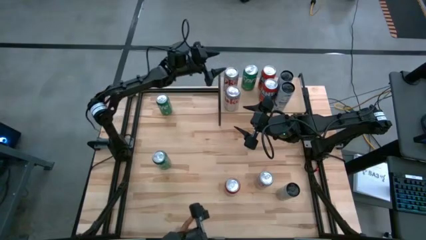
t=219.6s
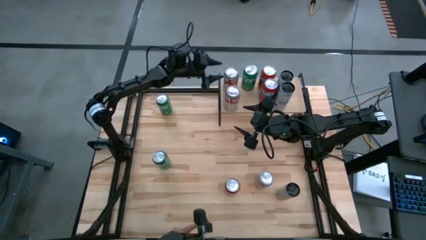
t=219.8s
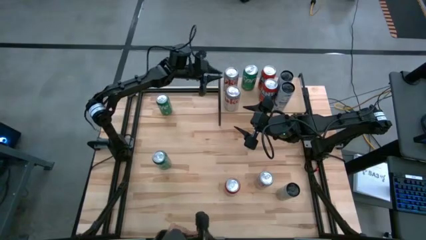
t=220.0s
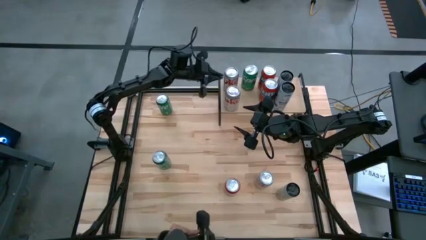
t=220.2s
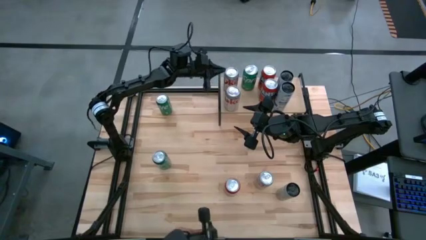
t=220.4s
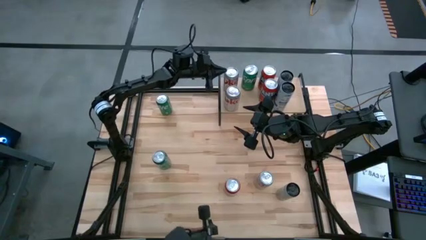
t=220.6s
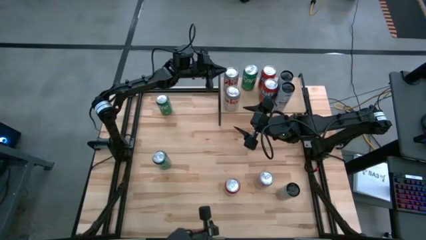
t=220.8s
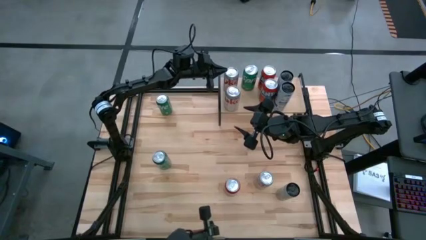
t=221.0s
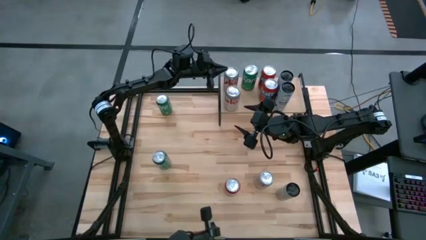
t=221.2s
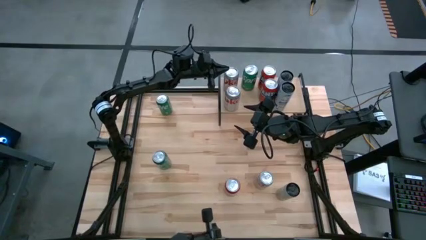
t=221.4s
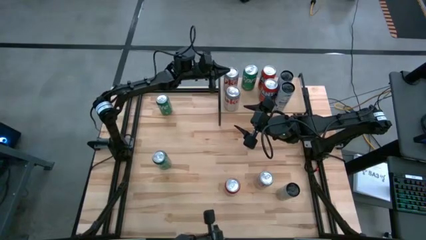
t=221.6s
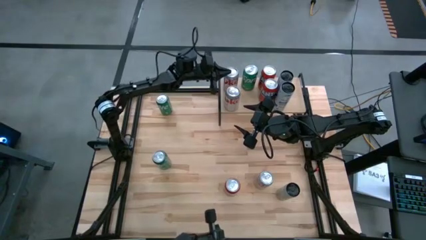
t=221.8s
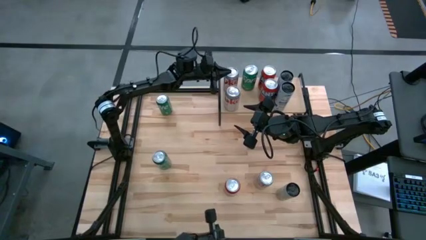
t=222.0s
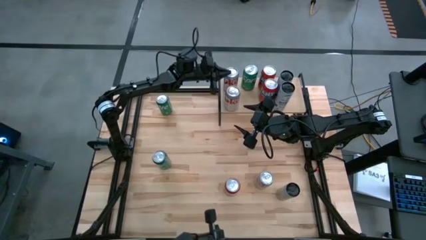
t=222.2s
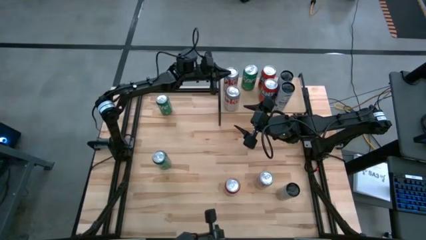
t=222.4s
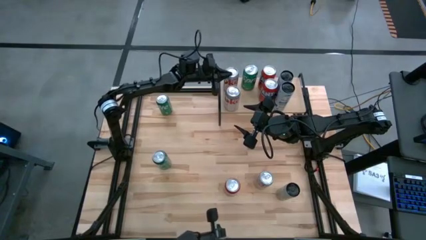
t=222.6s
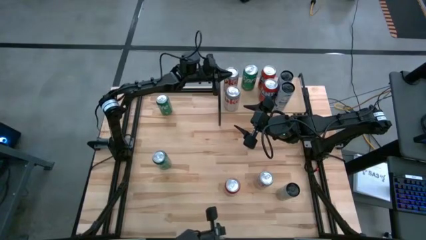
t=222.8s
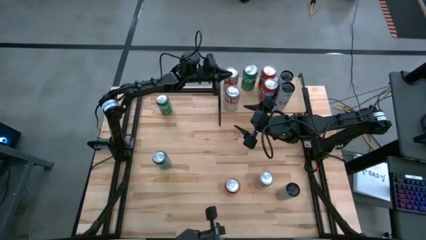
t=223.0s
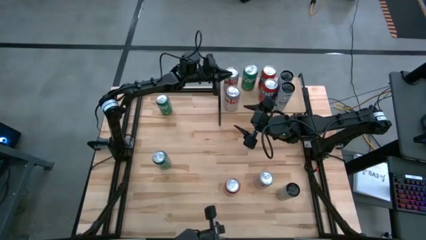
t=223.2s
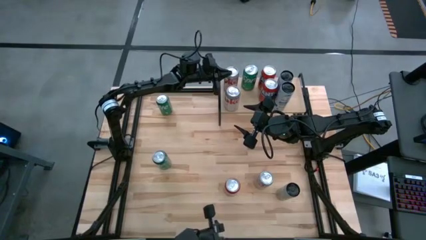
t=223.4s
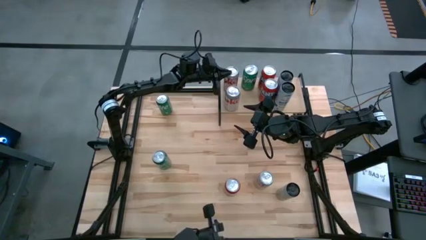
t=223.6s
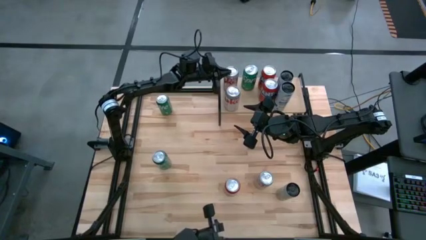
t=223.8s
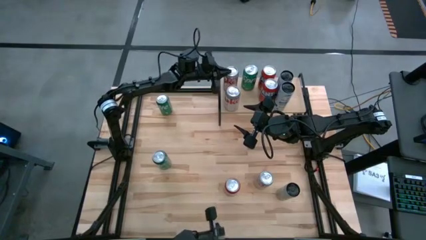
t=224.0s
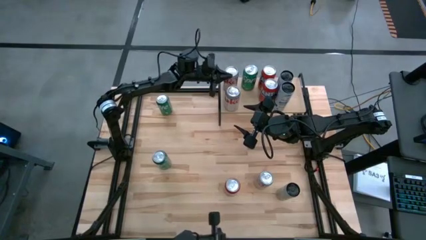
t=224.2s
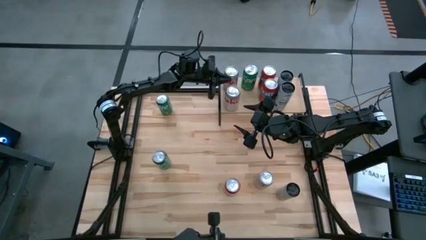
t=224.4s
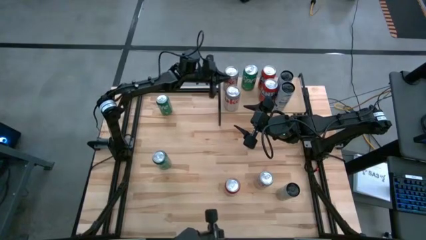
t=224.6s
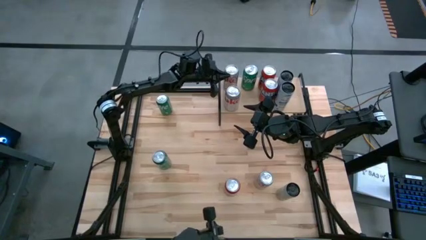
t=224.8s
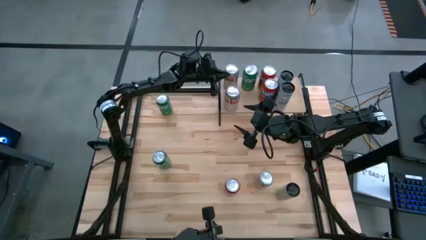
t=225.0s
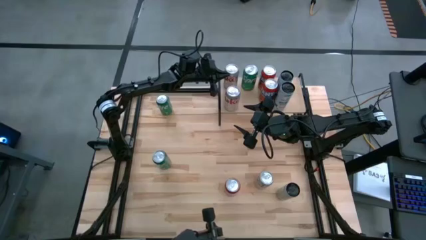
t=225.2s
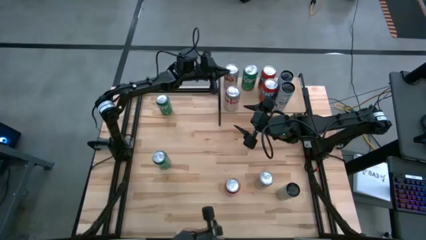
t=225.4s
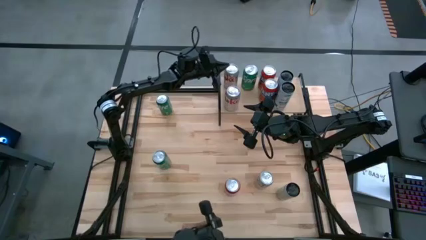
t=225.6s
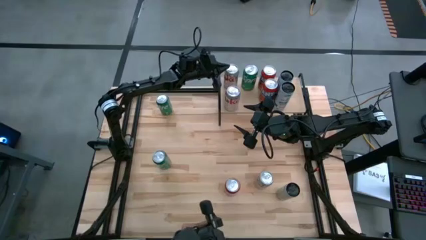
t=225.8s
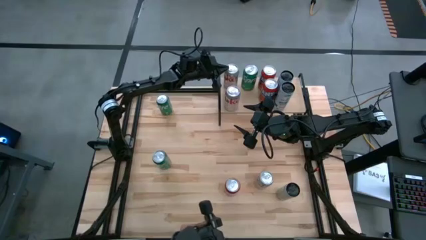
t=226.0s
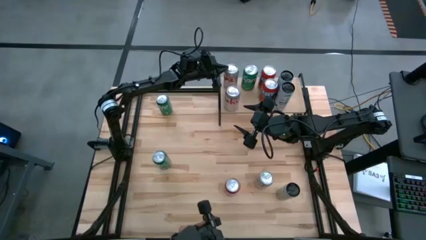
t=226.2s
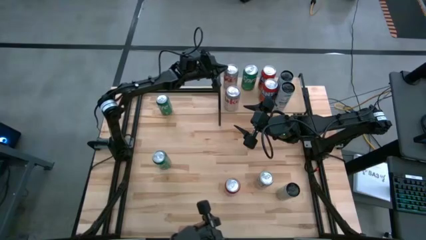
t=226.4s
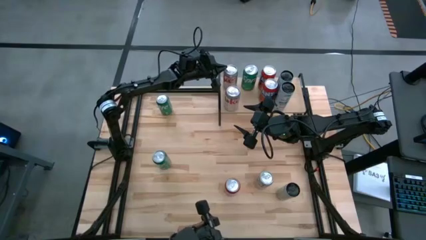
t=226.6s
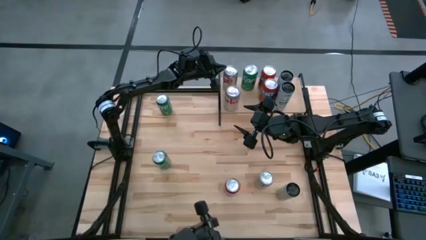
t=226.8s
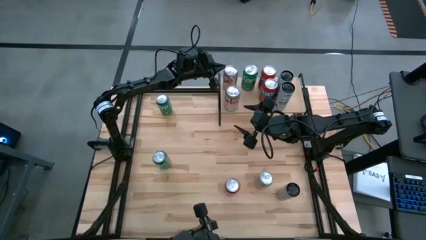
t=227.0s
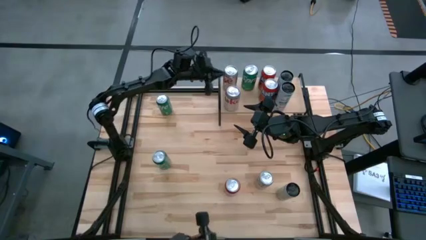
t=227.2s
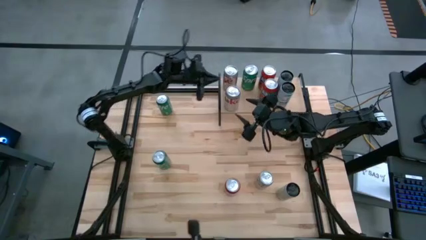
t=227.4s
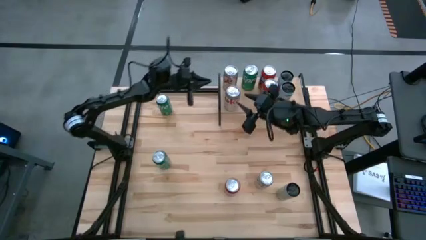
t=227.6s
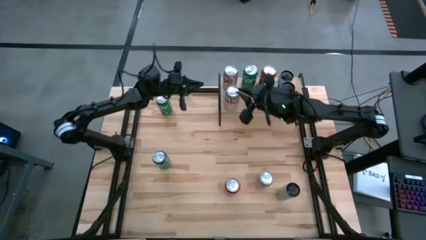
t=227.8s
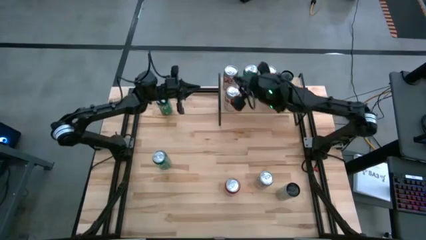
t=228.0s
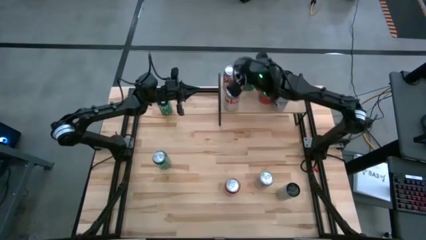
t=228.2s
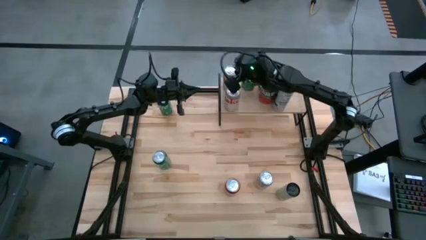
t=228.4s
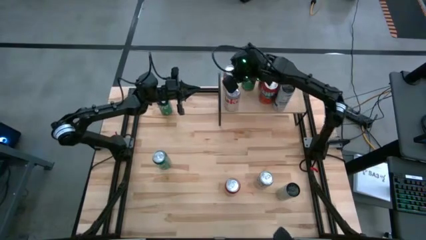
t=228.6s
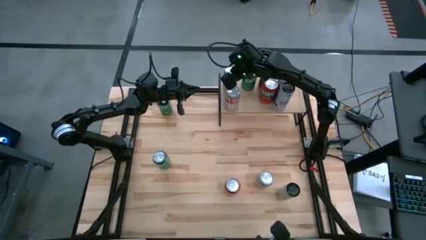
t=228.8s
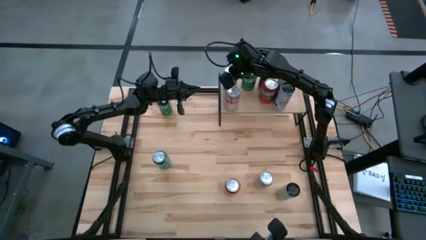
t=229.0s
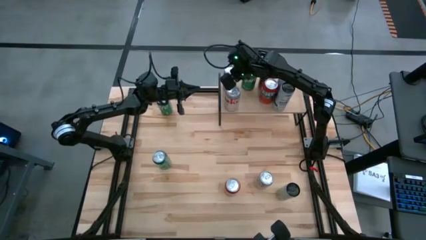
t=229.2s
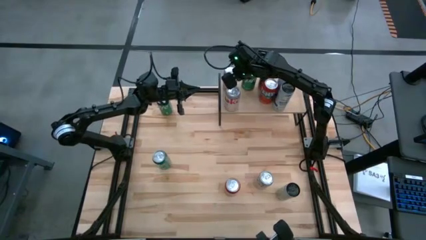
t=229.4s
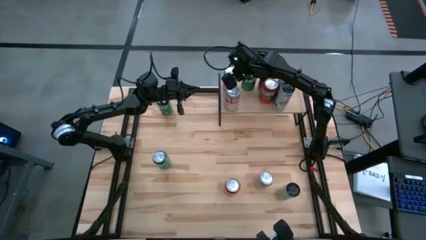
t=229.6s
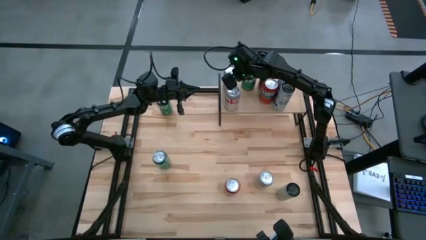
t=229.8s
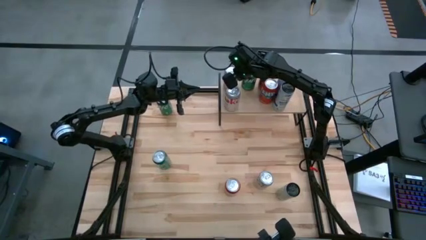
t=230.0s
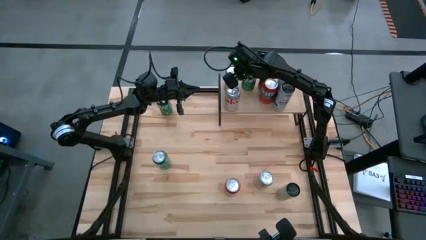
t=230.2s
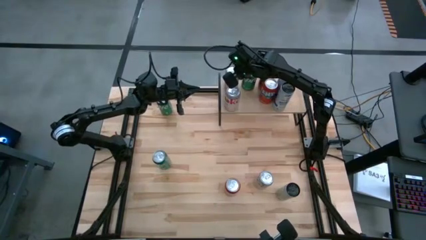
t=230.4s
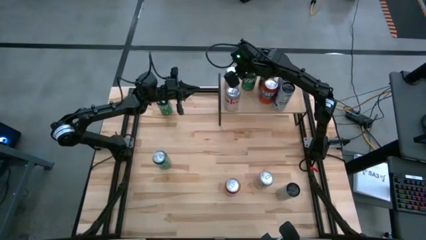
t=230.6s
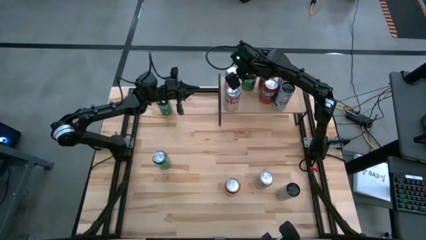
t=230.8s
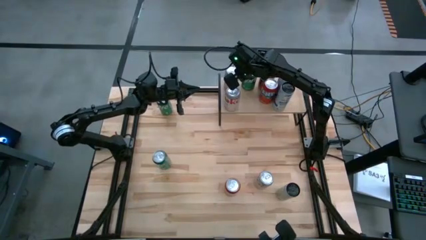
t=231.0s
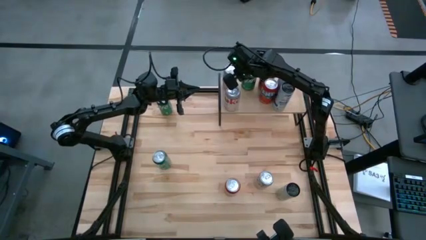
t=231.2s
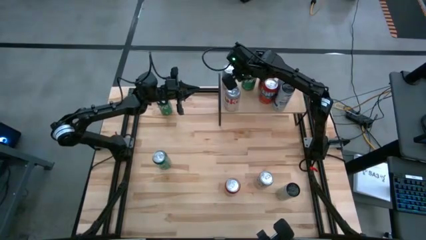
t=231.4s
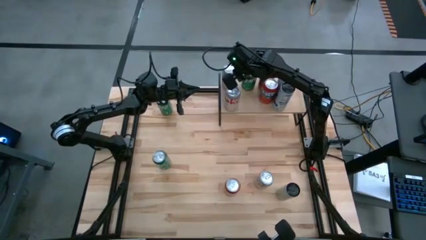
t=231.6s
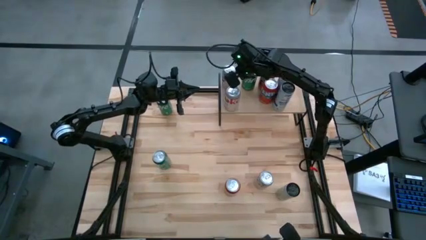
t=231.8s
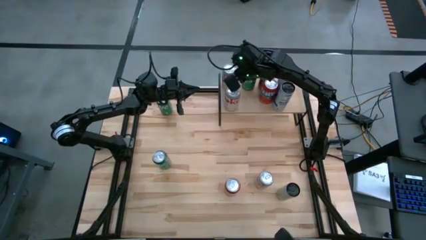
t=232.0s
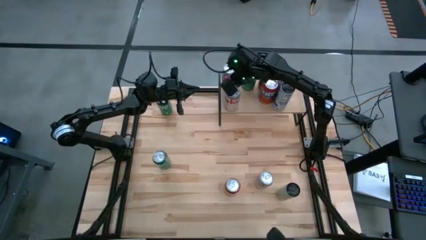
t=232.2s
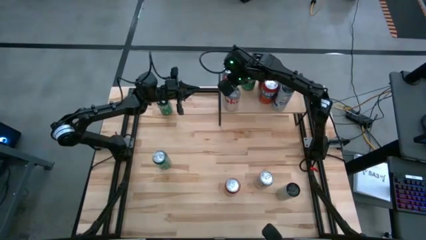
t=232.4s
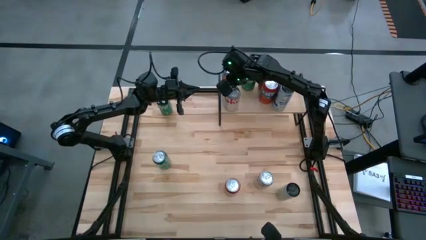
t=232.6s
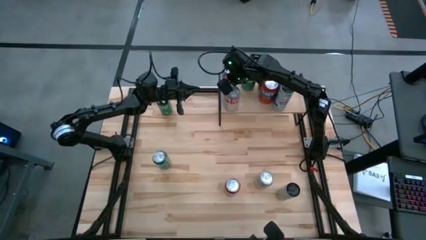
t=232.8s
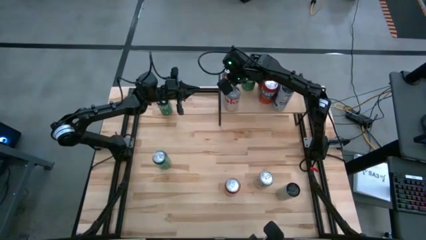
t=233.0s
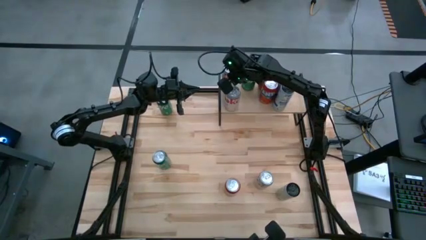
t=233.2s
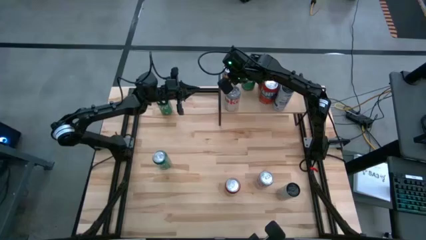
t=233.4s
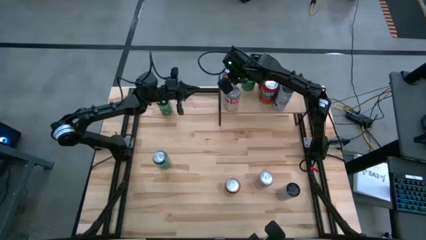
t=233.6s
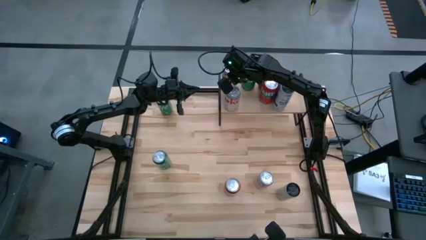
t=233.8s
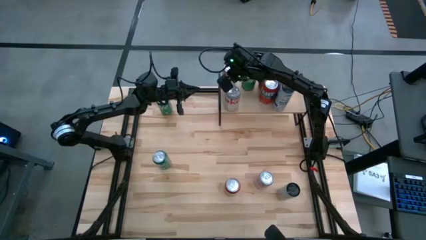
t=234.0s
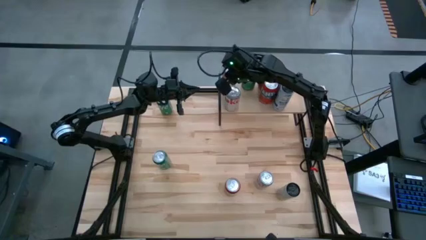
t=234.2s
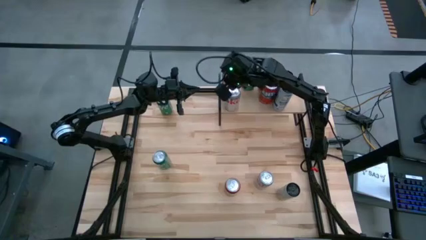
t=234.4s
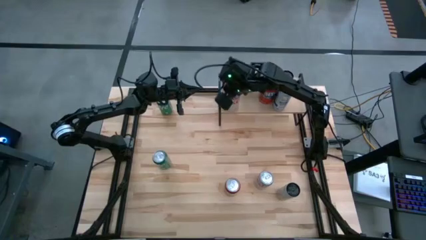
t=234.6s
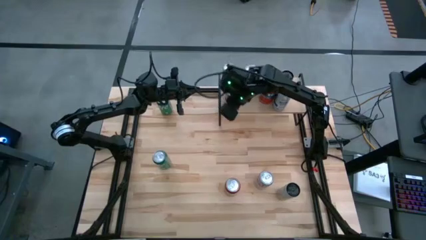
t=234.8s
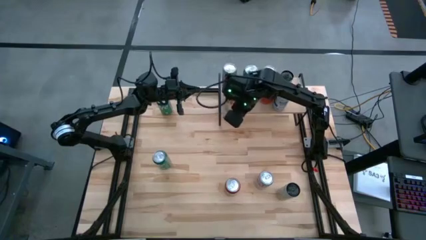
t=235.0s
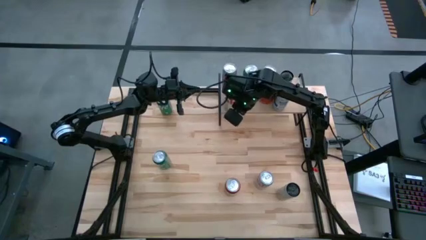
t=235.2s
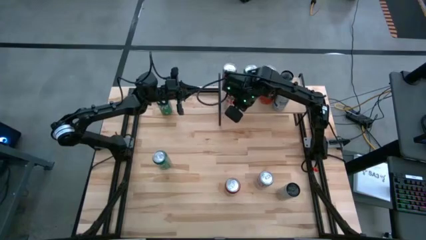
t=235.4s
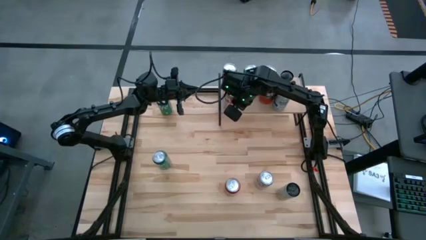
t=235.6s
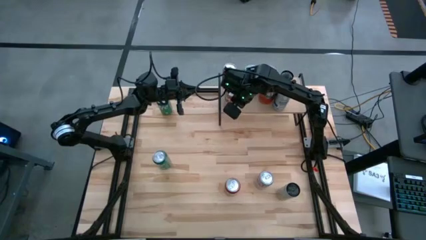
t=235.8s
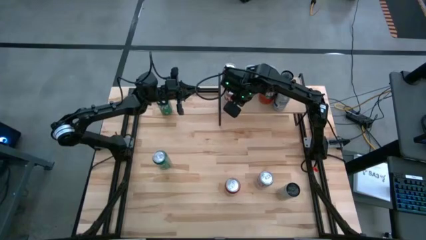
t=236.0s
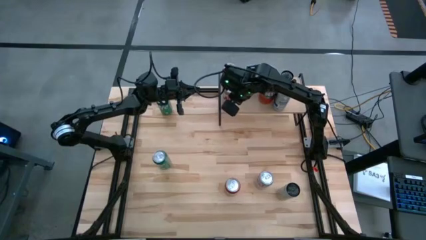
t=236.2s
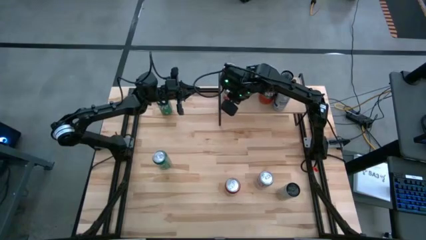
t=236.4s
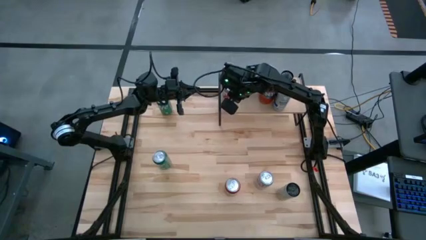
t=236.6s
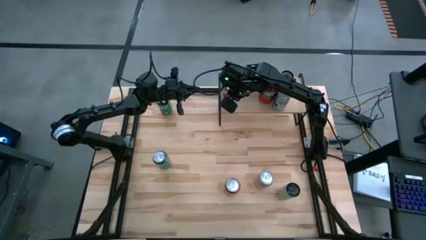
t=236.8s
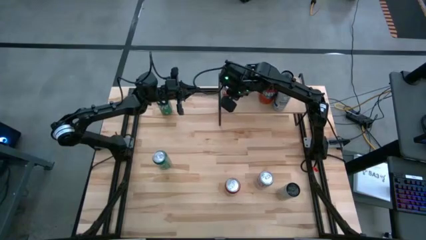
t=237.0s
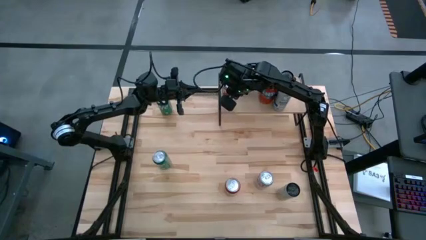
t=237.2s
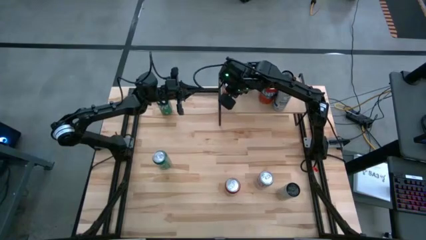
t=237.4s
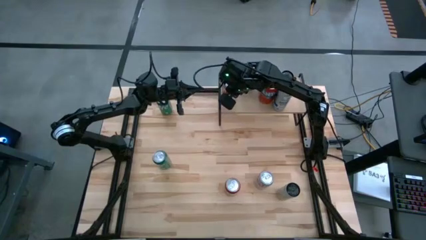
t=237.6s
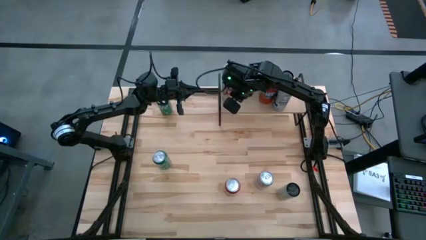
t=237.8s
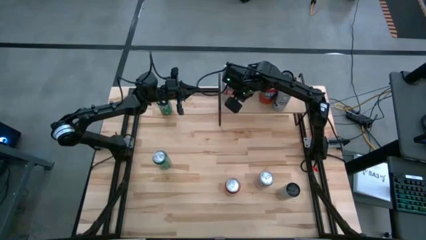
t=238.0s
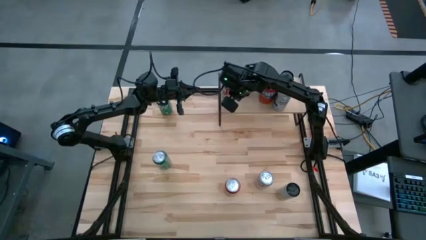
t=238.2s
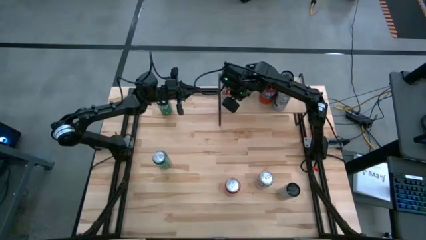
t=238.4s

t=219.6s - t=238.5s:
Task: Place canned beverage on shelf
Put the left silver soda can on the back of the shelf aligned with the other silver soda can
